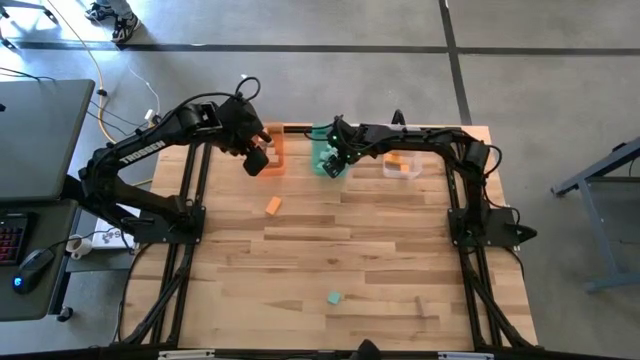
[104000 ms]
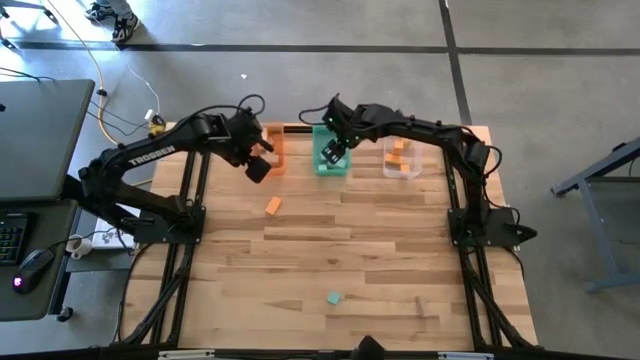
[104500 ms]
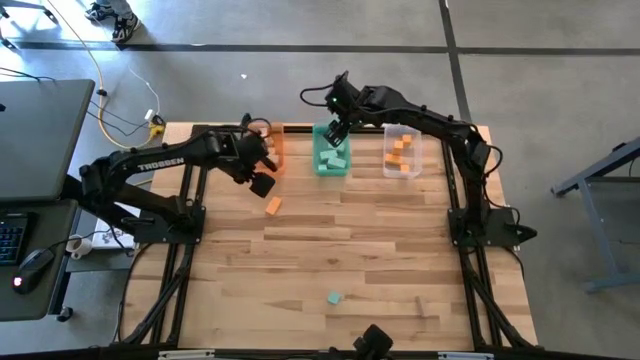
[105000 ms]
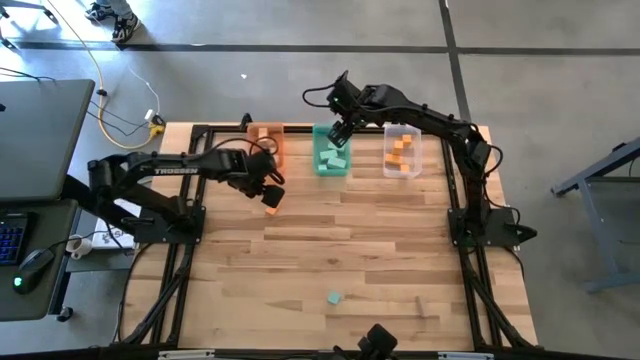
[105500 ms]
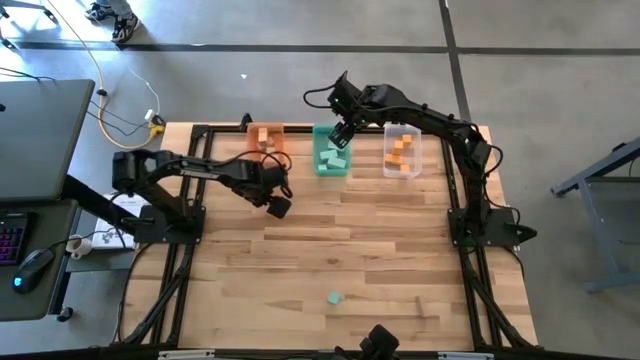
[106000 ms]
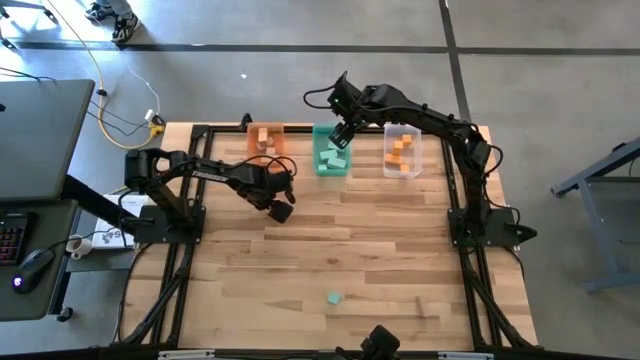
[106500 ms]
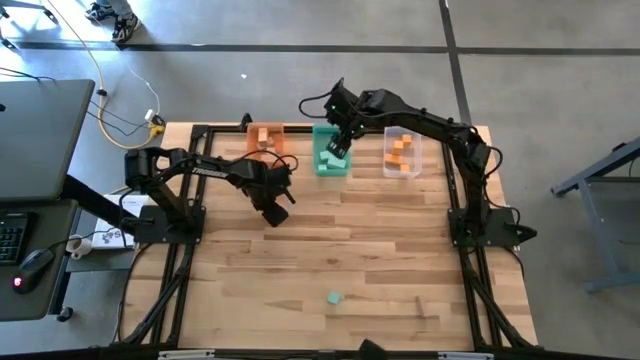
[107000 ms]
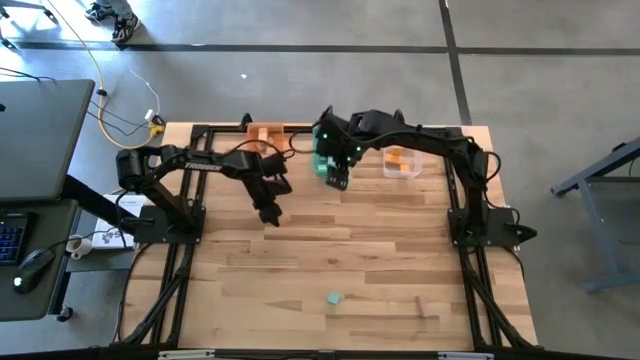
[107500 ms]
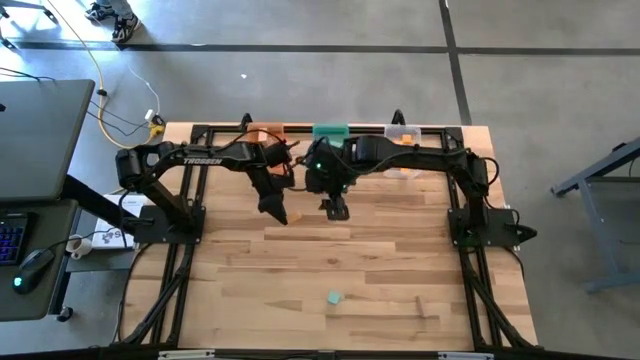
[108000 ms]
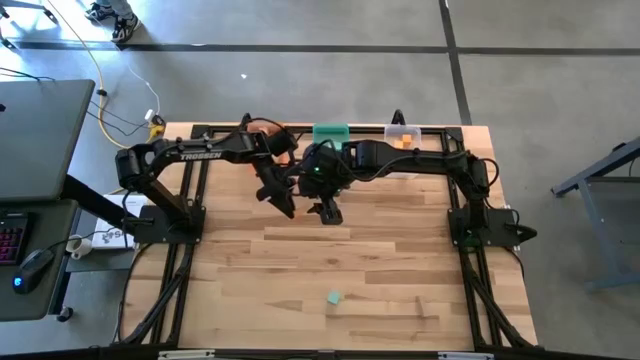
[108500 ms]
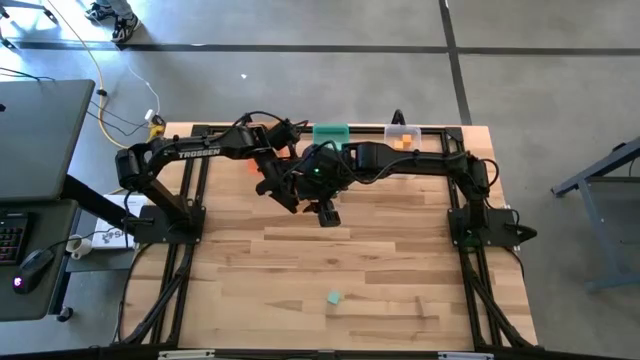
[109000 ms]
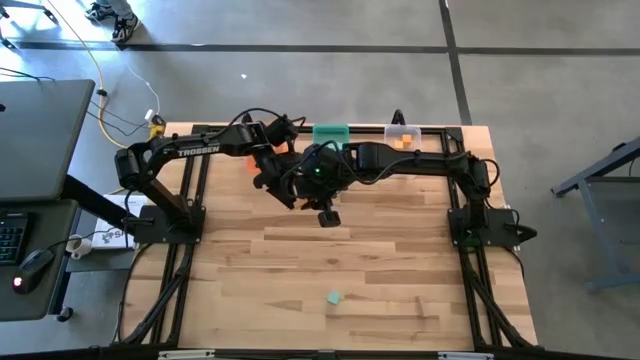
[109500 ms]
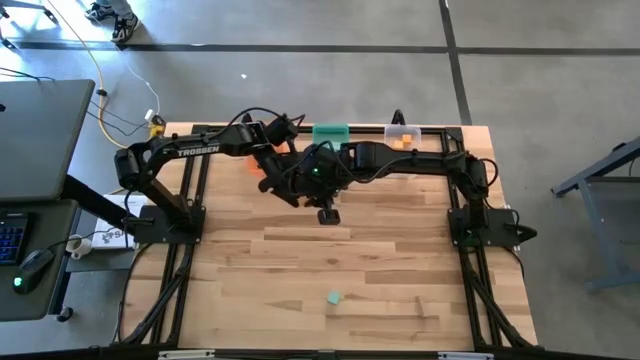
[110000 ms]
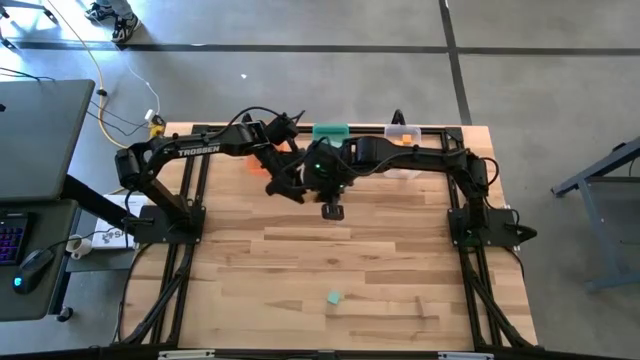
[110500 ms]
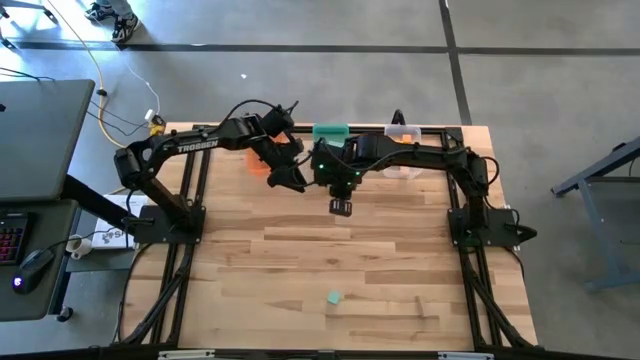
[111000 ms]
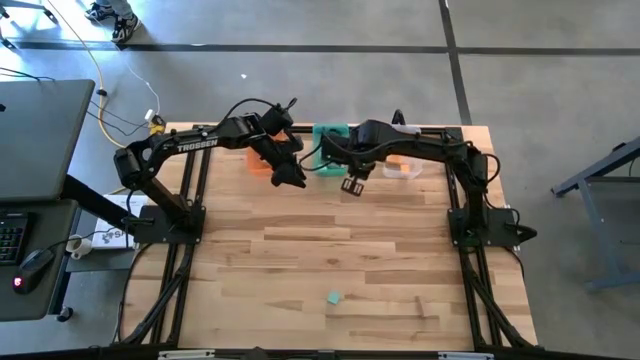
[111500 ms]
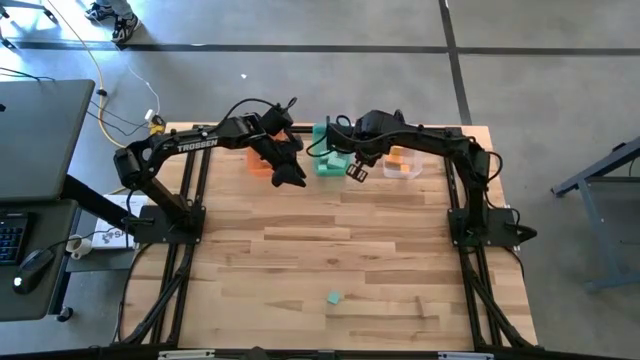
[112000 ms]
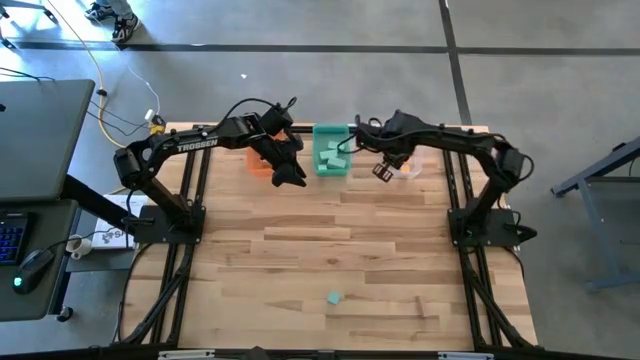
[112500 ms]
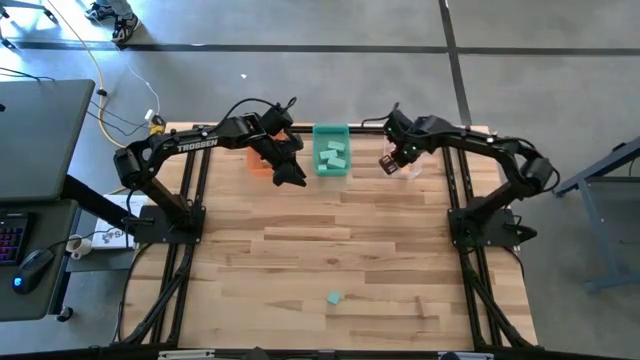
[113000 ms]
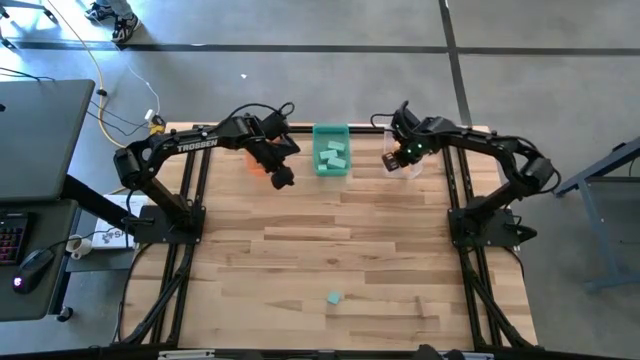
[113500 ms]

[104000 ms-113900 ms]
Task: Sort & place blocks by color
Put the yellow block into the transparent bin

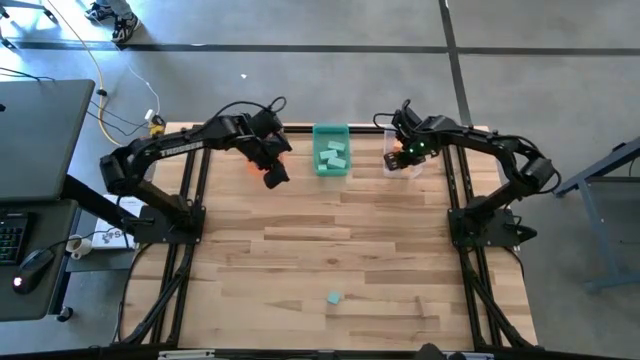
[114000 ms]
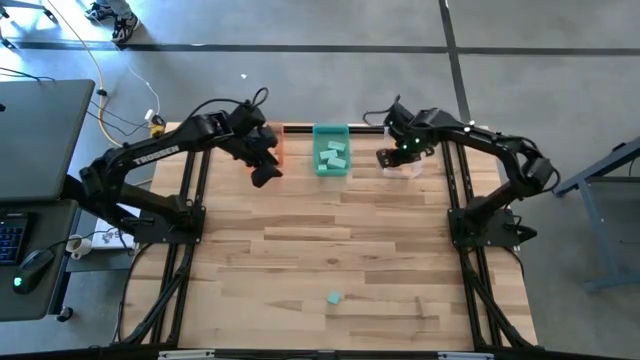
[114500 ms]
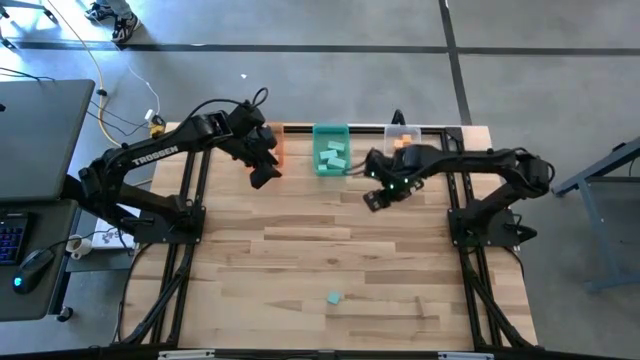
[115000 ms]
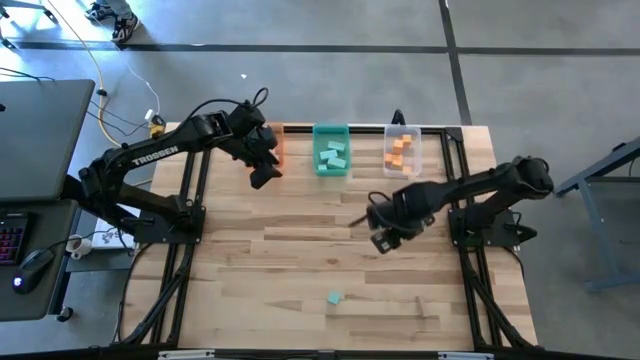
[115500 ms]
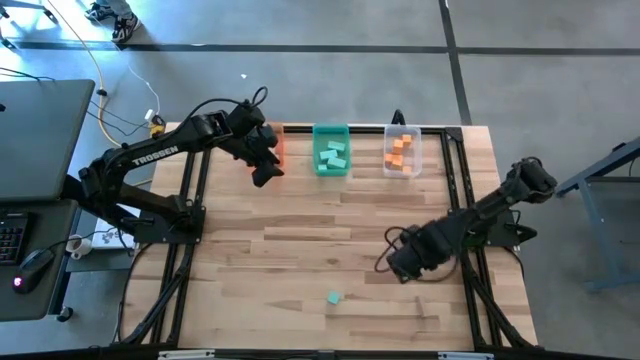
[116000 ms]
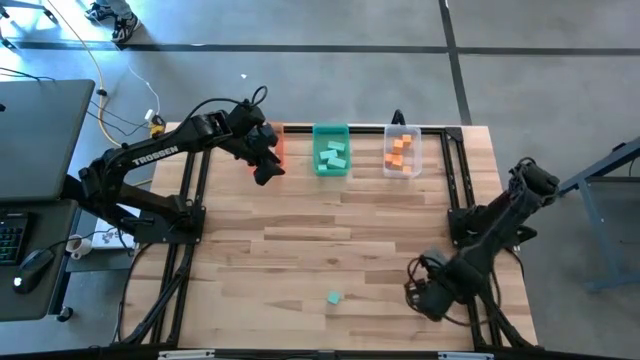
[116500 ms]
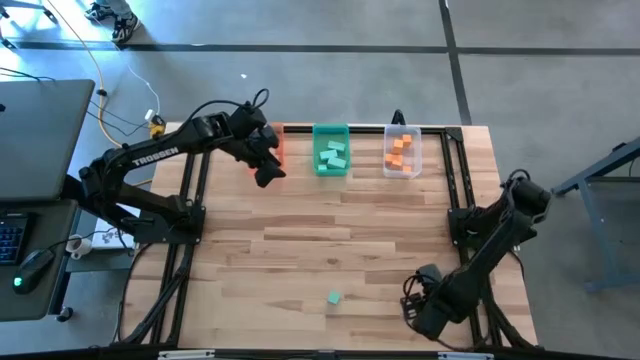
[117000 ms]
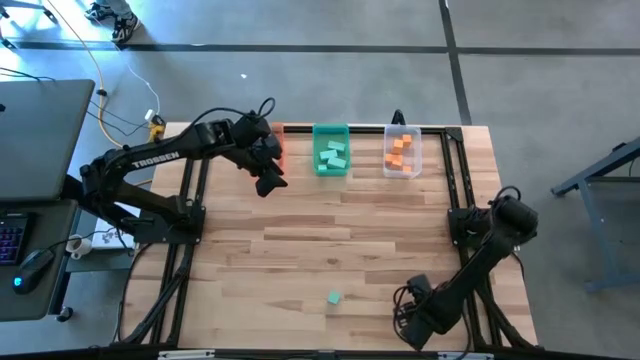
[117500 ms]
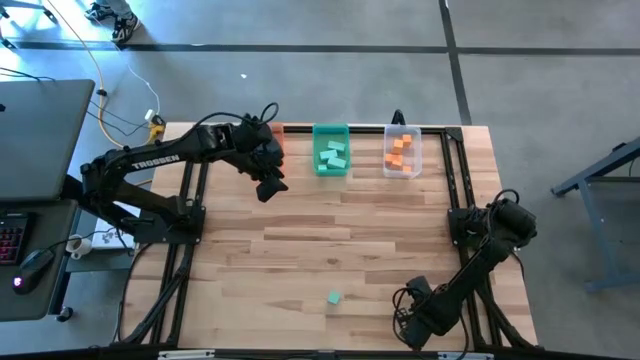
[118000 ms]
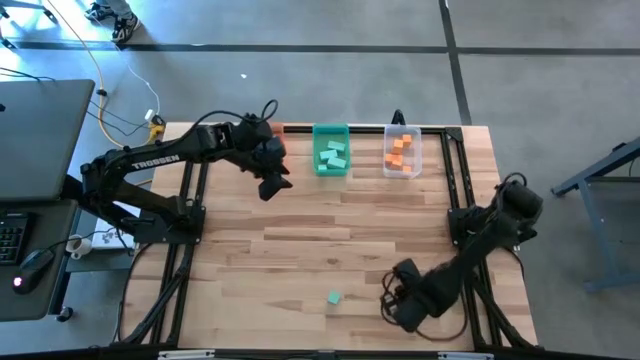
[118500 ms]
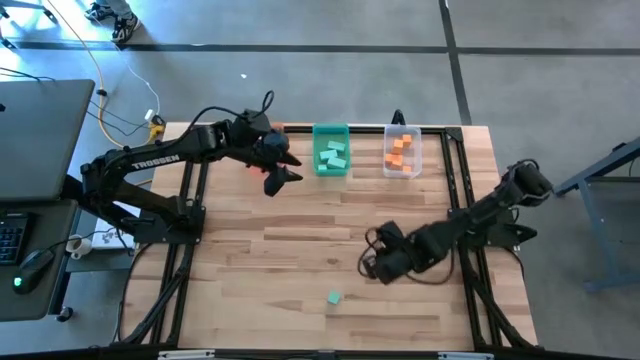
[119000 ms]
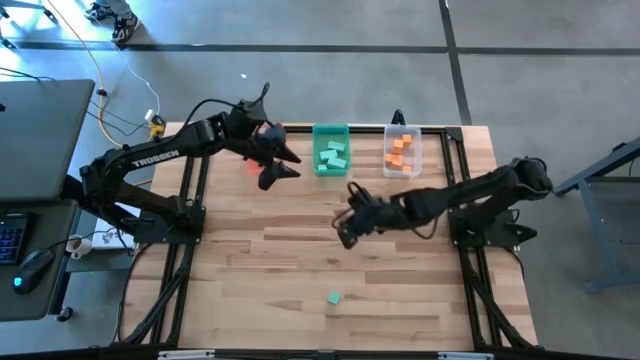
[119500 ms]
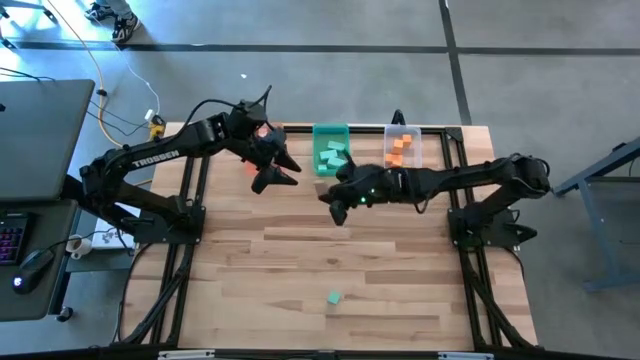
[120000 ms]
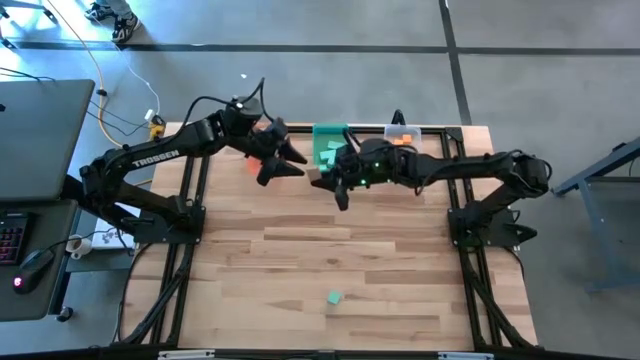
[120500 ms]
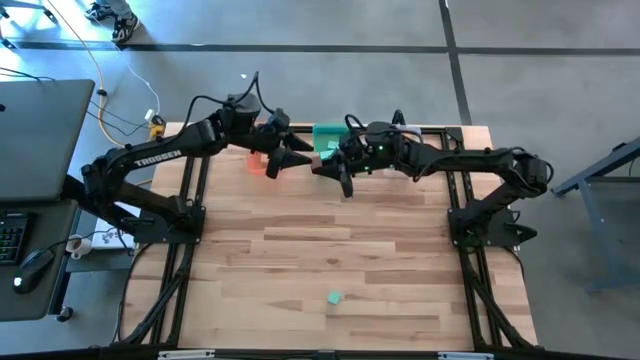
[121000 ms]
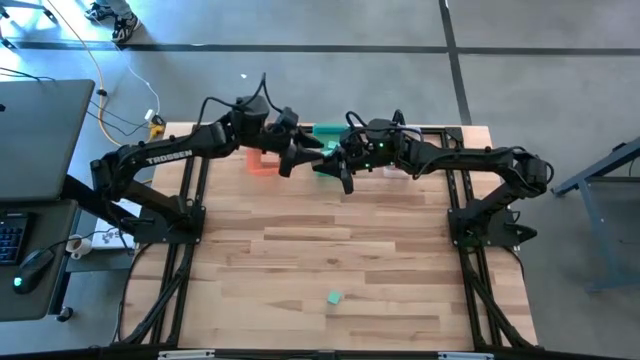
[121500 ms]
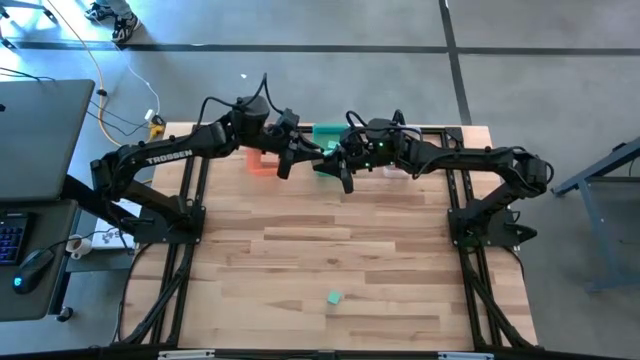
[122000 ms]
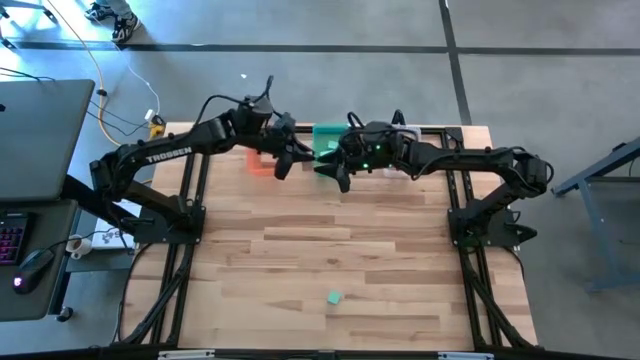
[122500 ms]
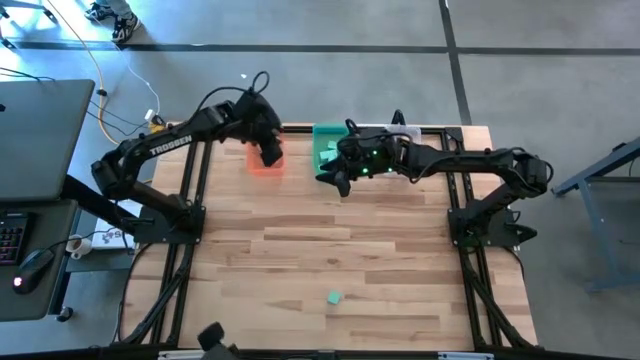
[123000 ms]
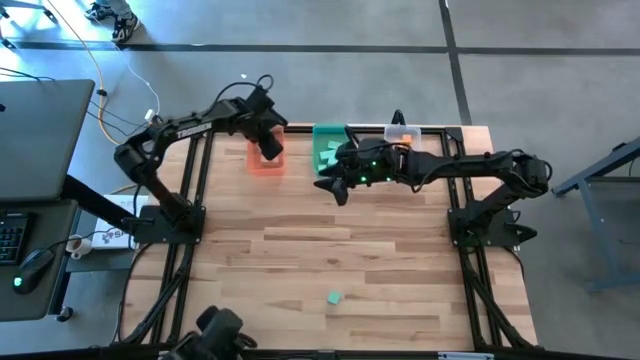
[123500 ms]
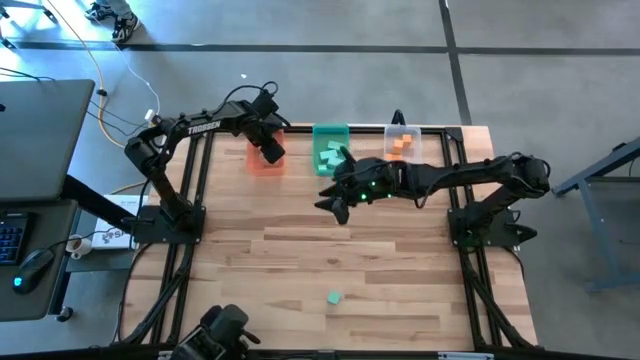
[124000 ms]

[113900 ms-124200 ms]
Put the brown block into the orange bin
